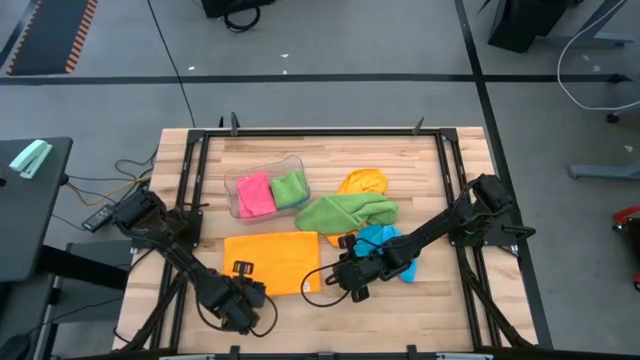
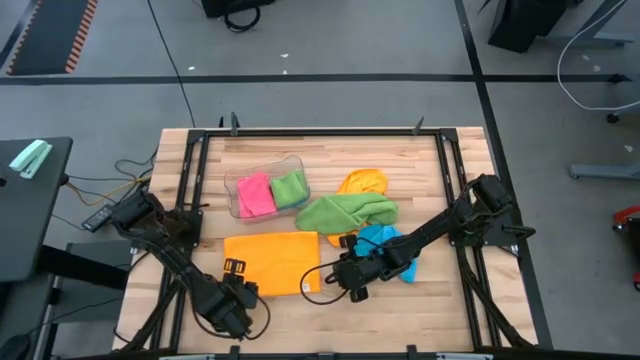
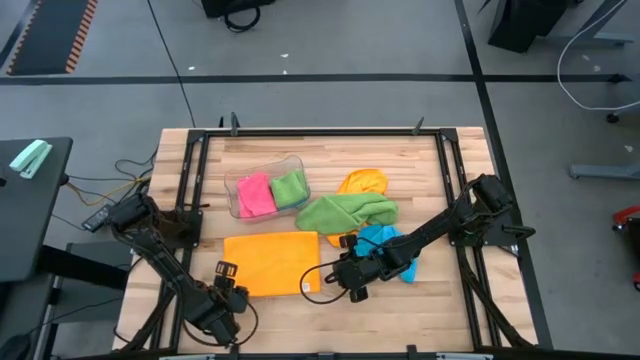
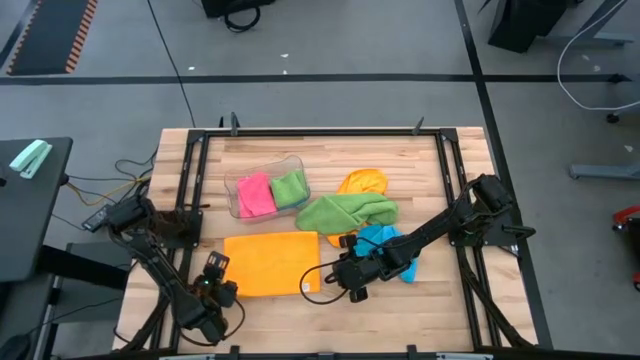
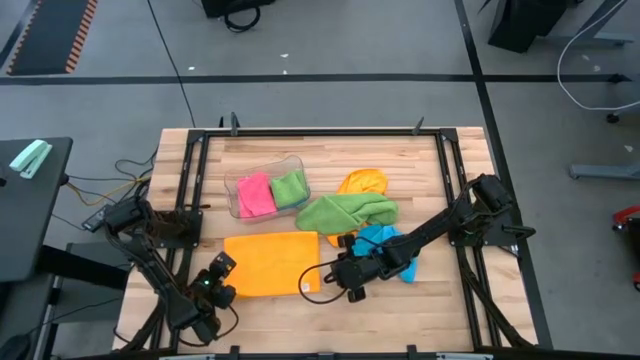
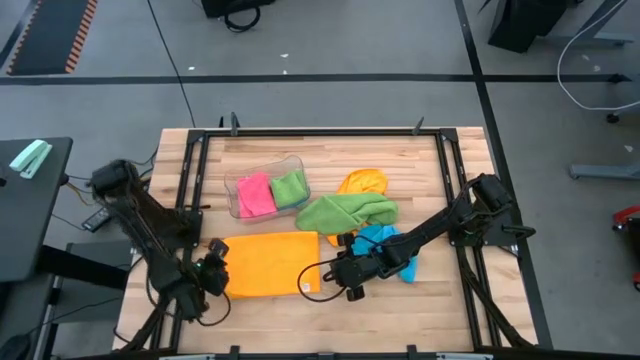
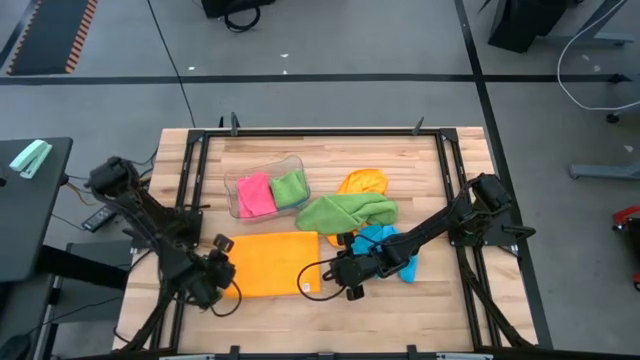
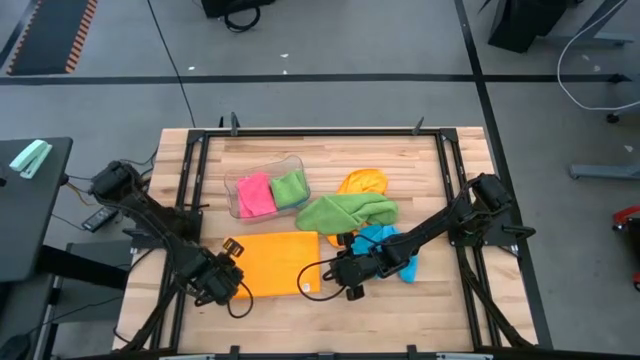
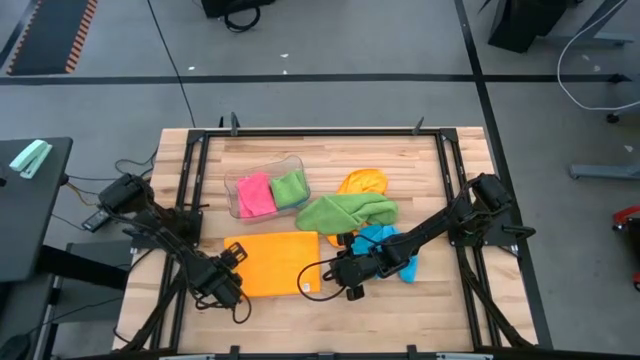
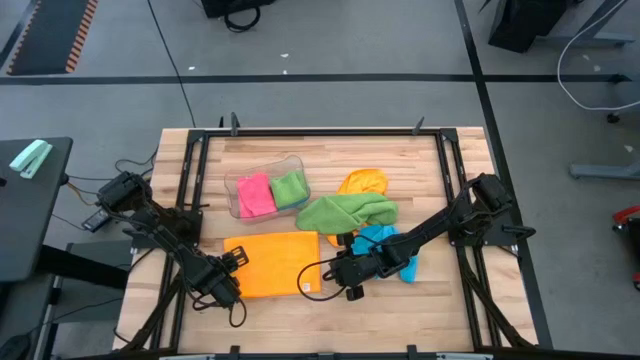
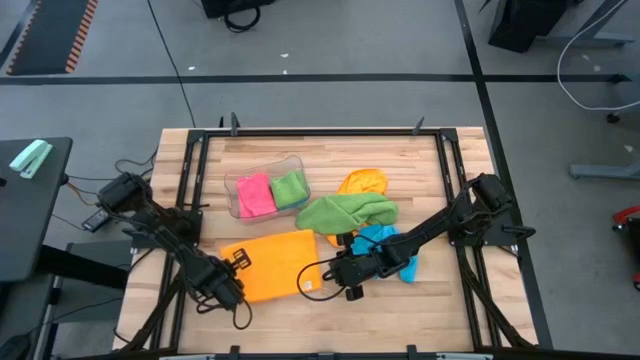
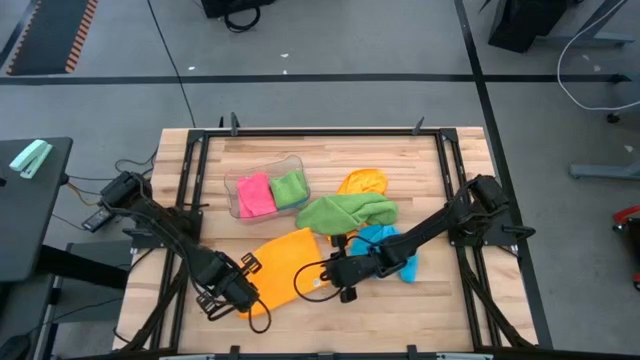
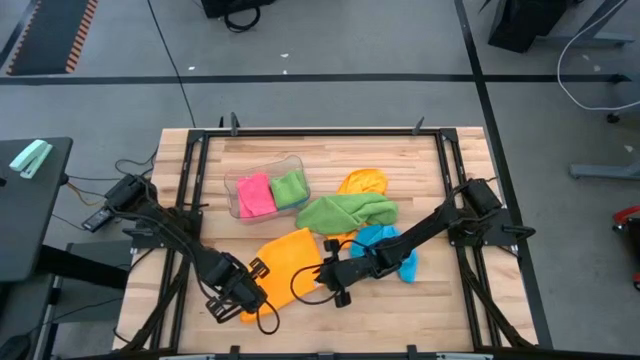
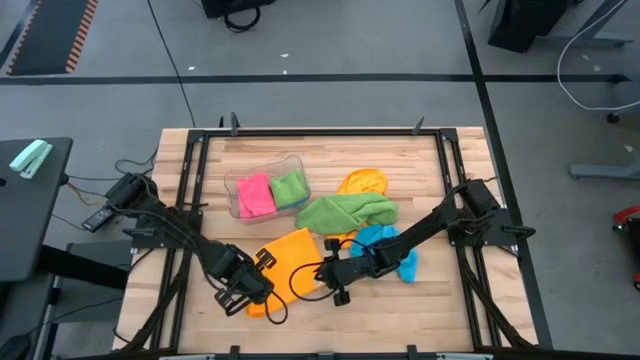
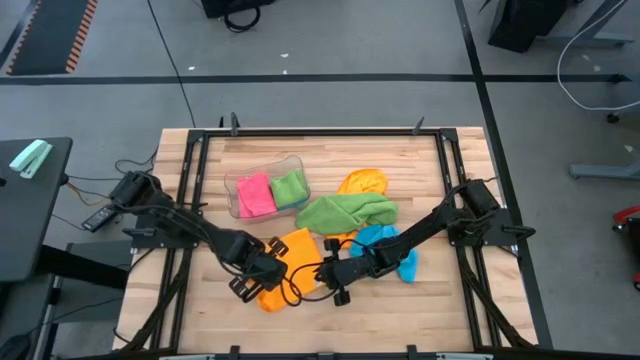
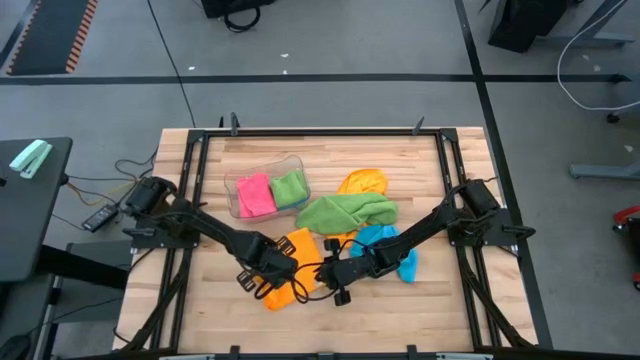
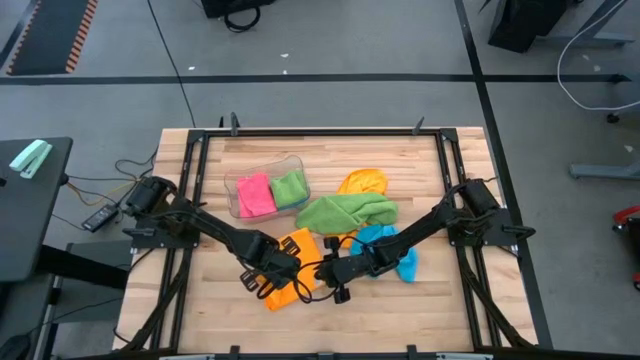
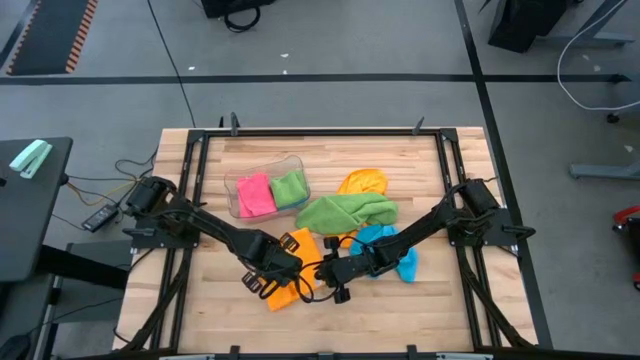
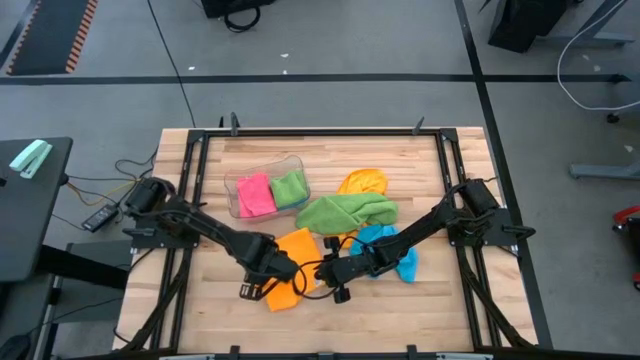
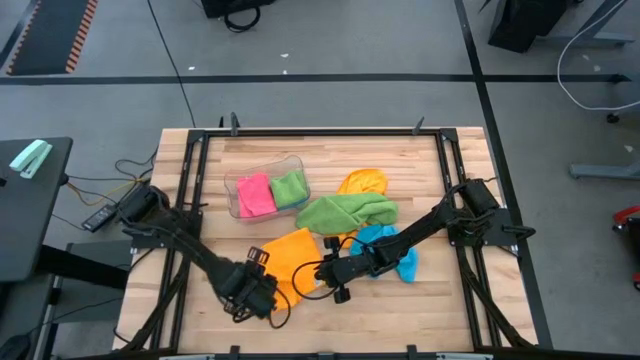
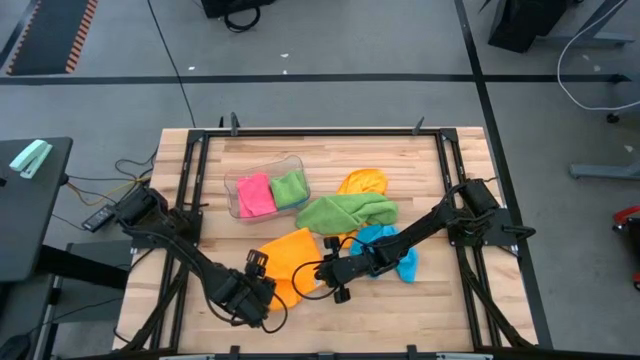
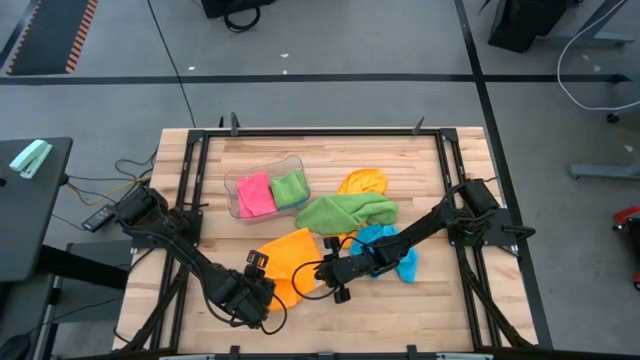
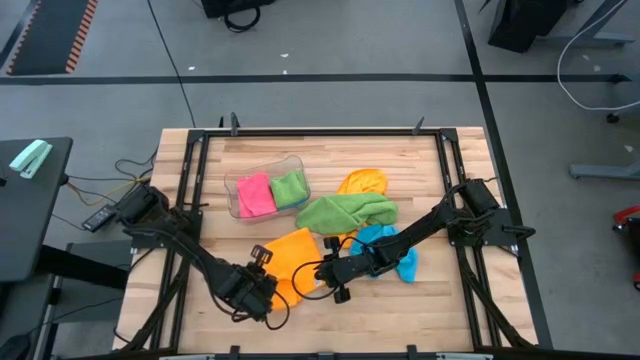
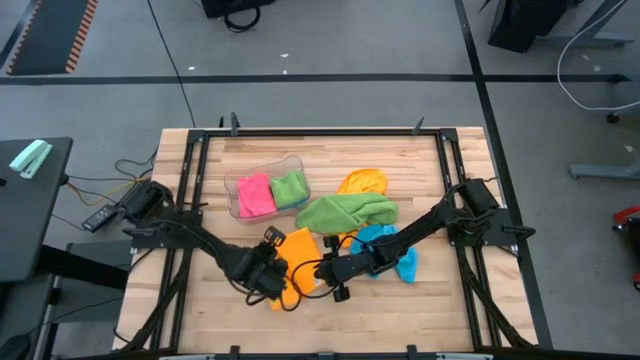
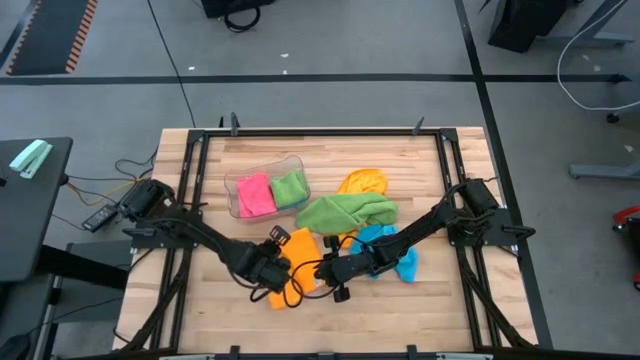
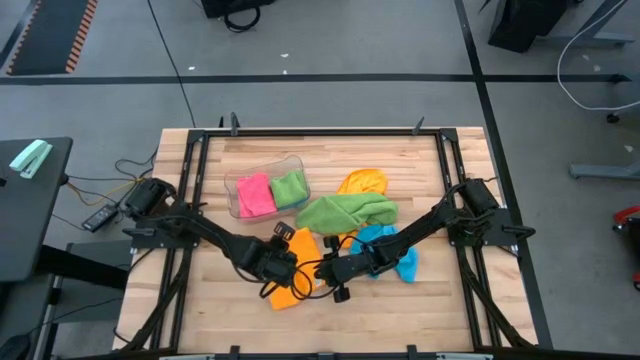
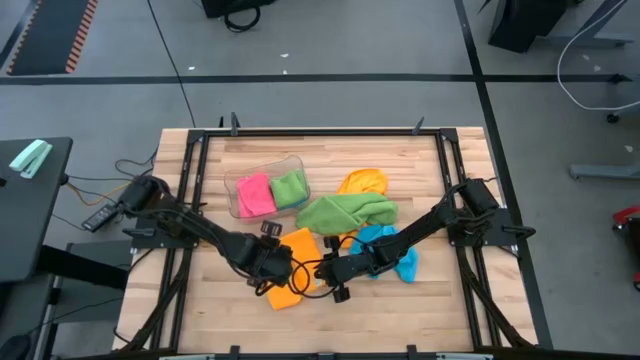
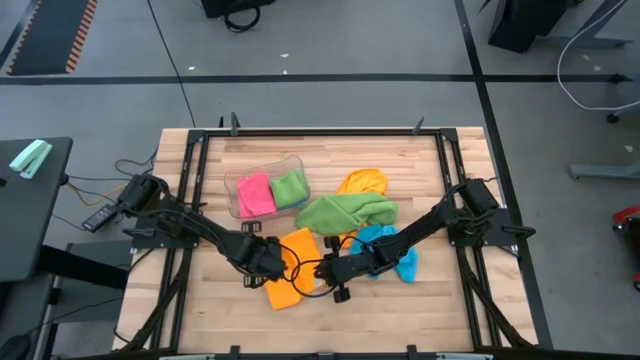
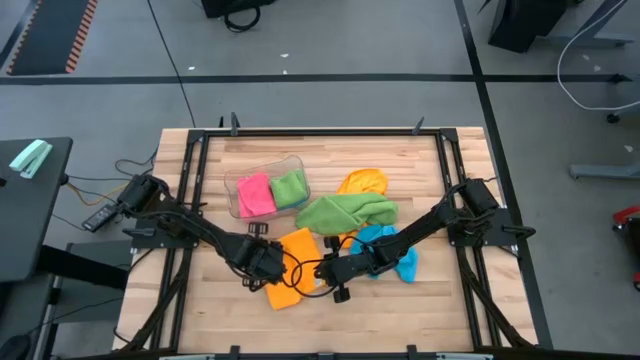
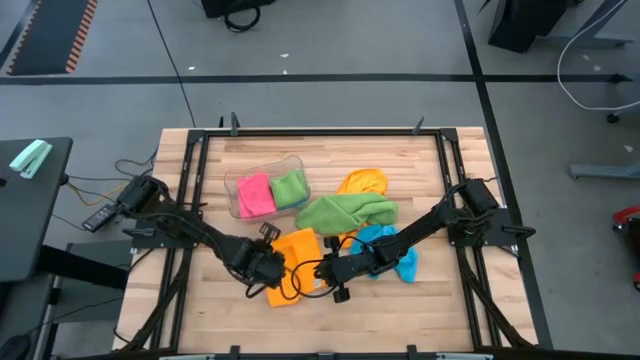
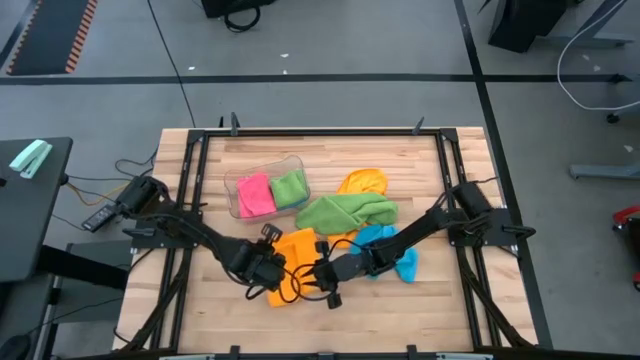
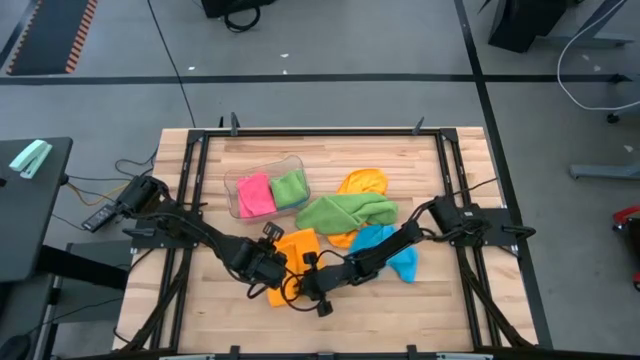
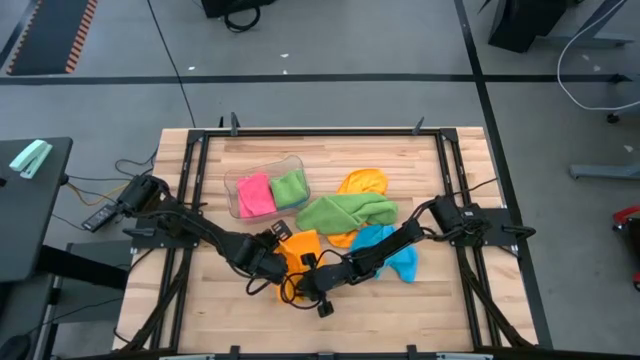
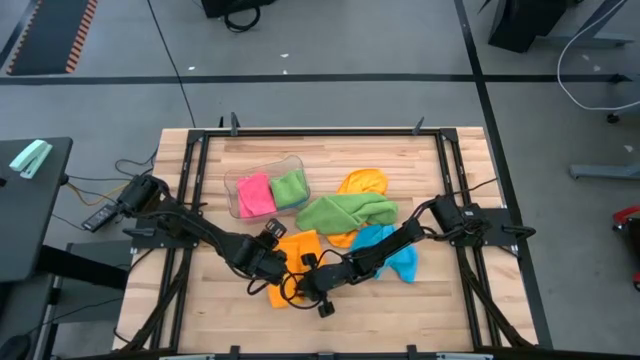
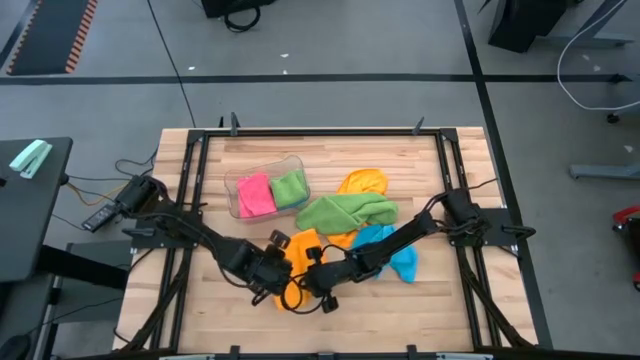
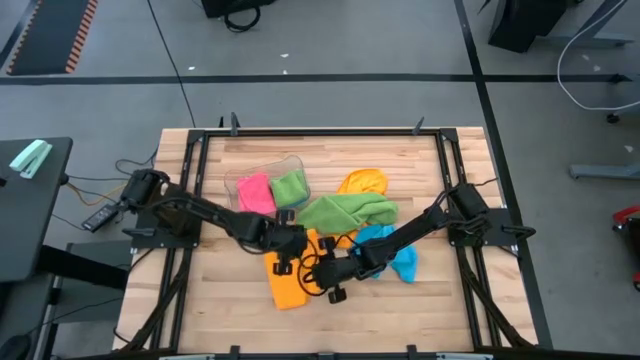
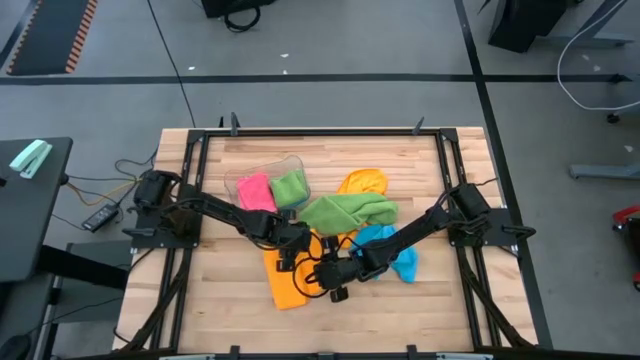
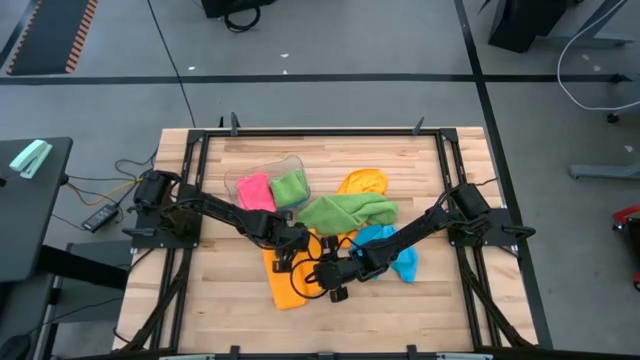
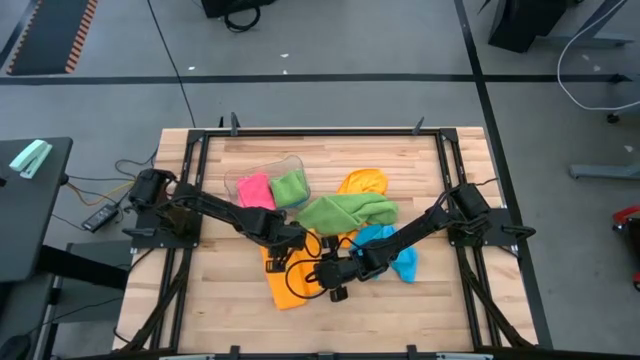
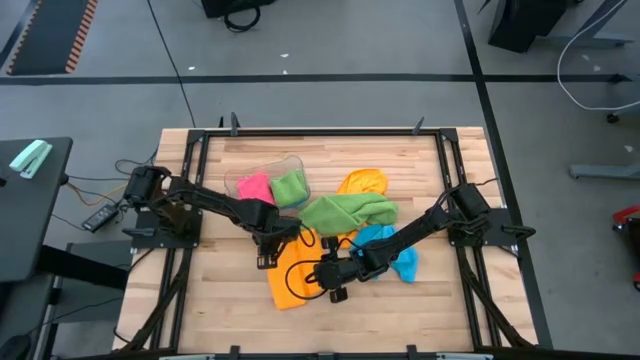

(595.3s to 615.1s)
Task: Fold microfiber towels
Fold the bottom yellow microfiber towel
